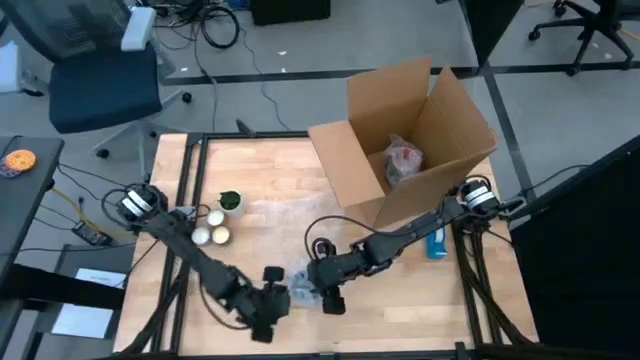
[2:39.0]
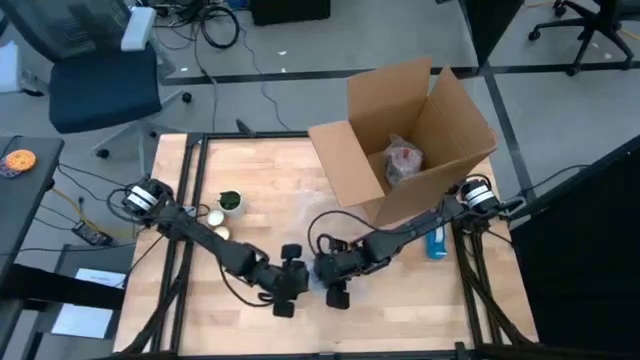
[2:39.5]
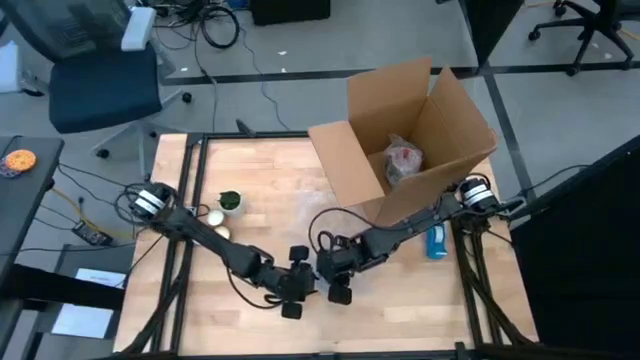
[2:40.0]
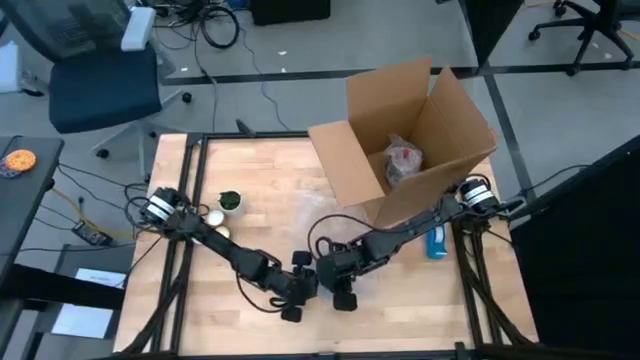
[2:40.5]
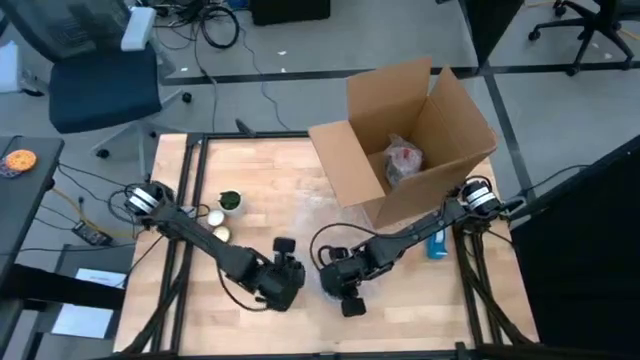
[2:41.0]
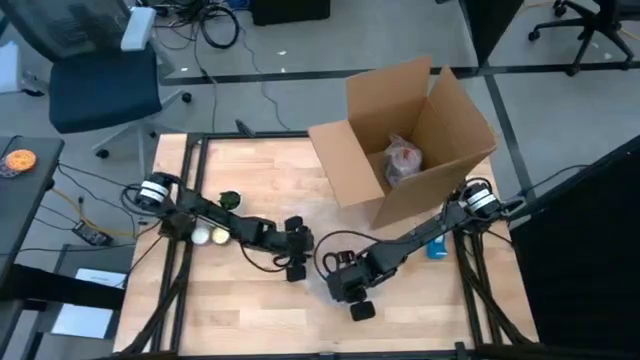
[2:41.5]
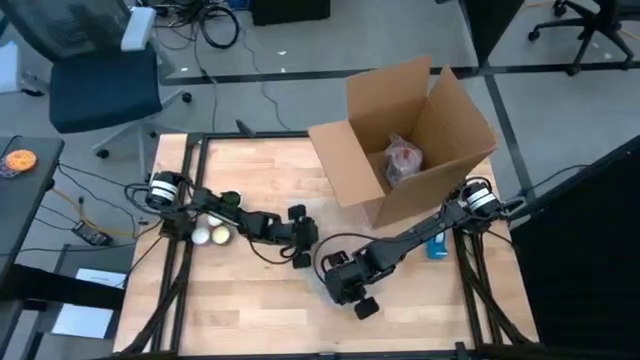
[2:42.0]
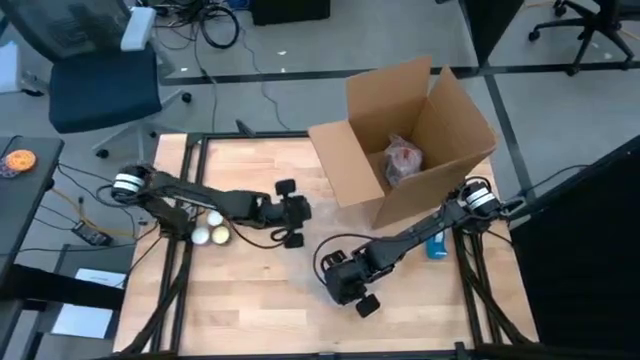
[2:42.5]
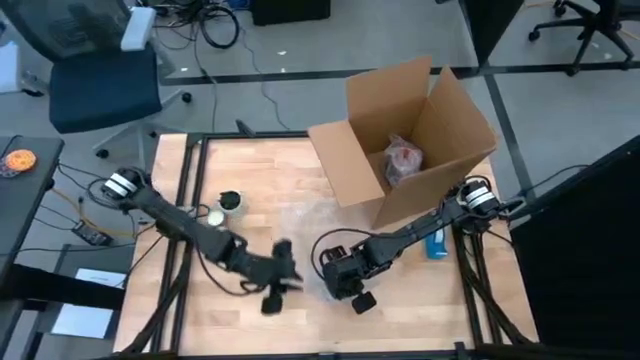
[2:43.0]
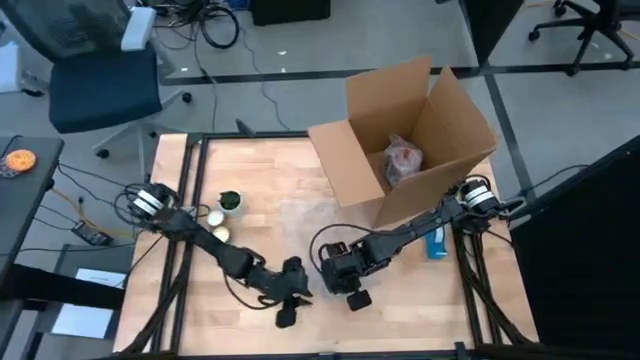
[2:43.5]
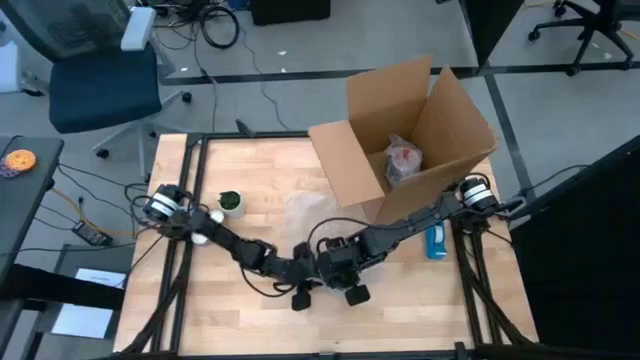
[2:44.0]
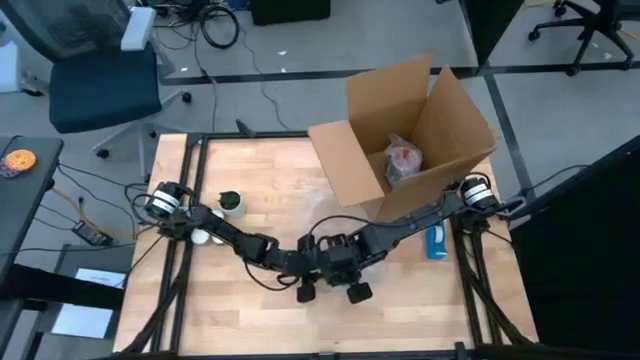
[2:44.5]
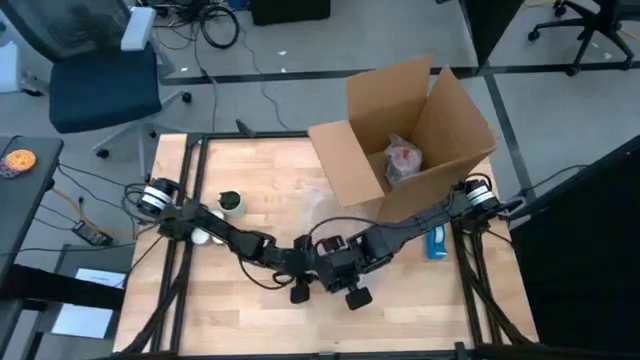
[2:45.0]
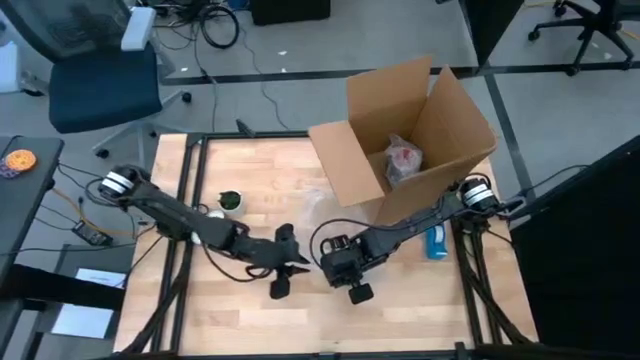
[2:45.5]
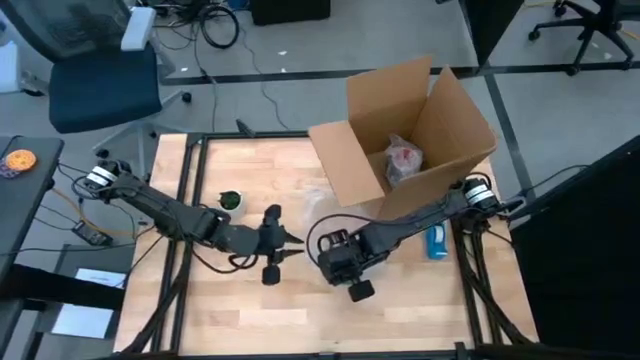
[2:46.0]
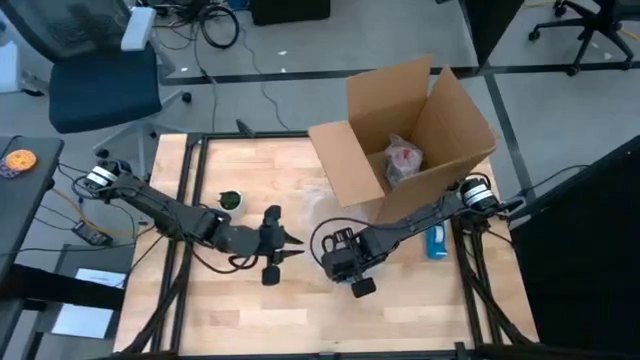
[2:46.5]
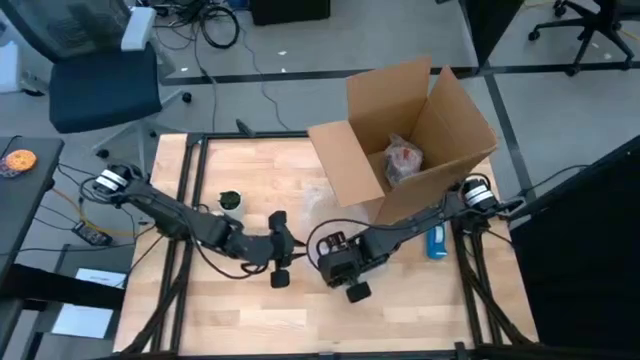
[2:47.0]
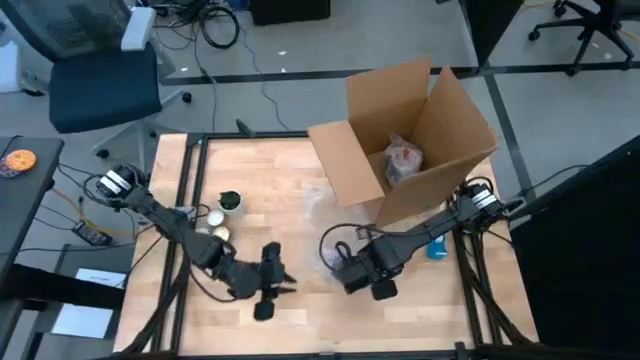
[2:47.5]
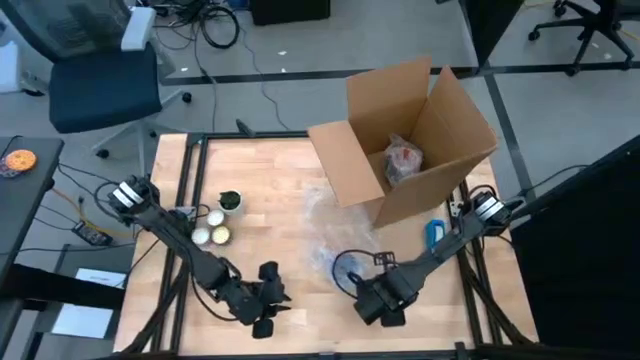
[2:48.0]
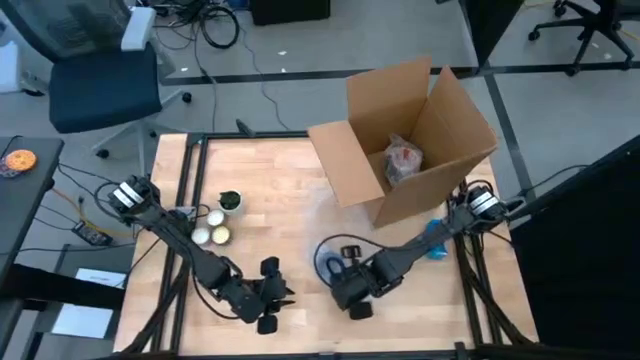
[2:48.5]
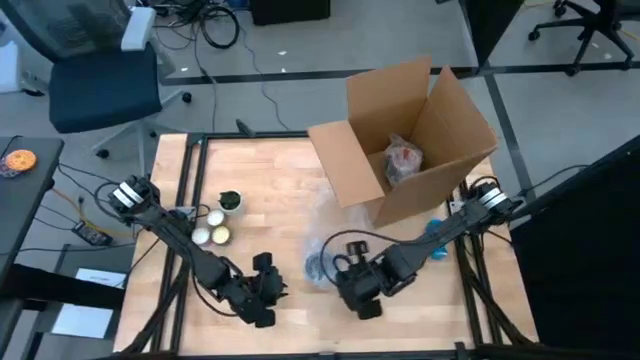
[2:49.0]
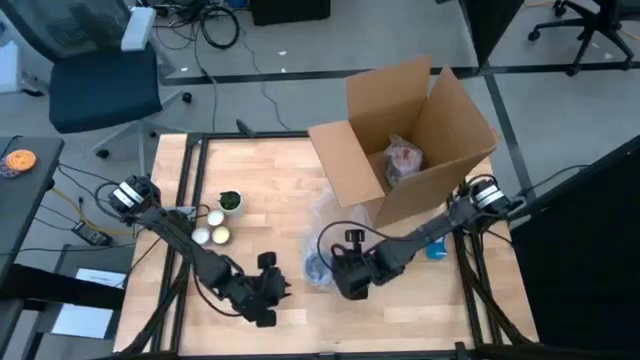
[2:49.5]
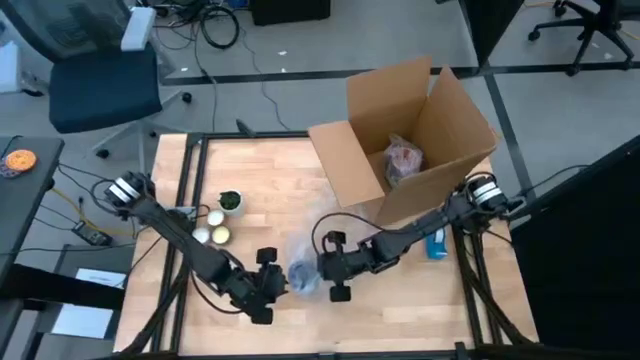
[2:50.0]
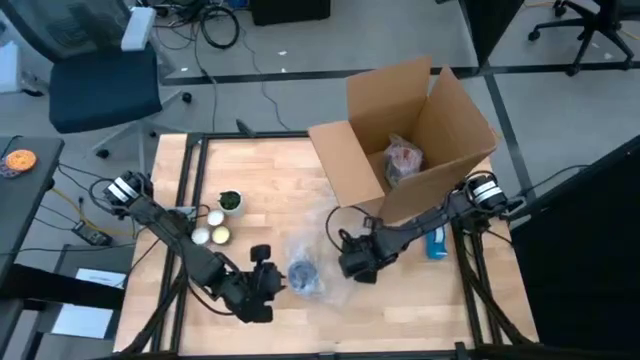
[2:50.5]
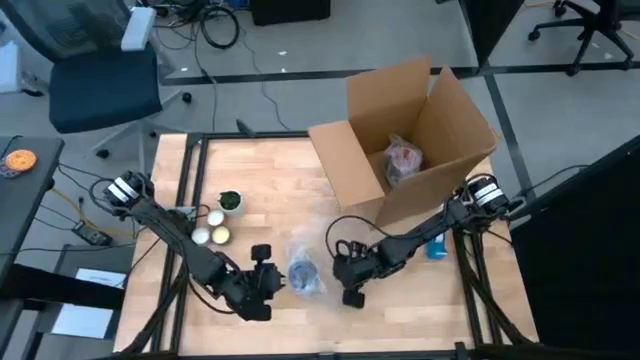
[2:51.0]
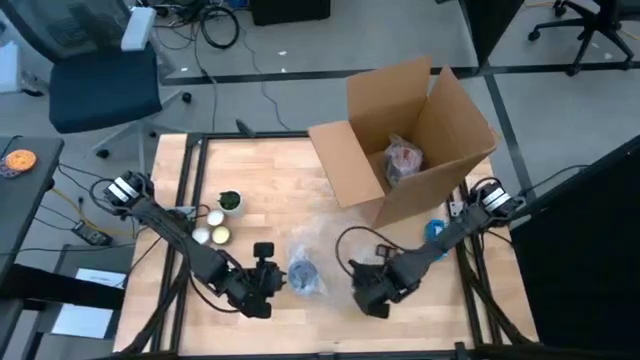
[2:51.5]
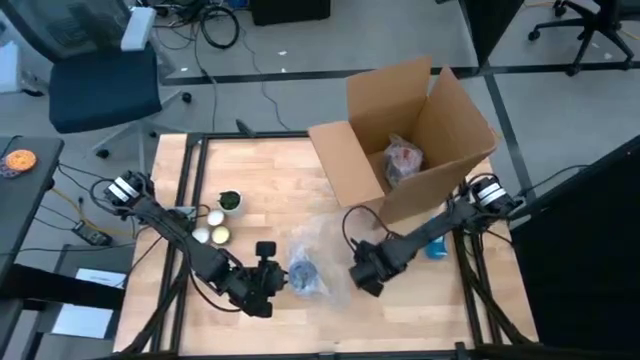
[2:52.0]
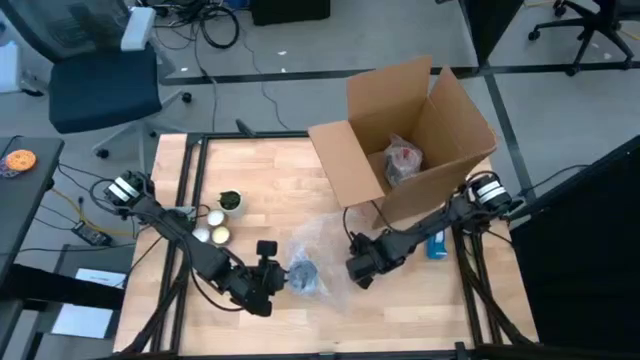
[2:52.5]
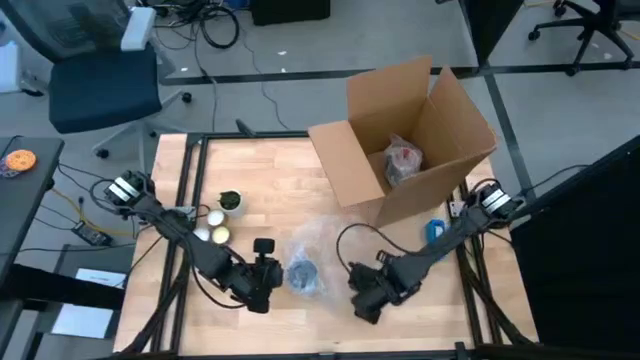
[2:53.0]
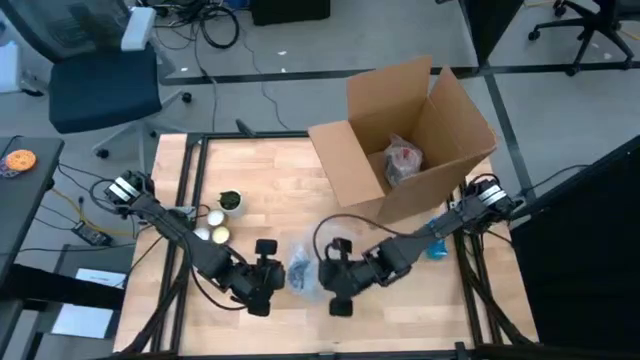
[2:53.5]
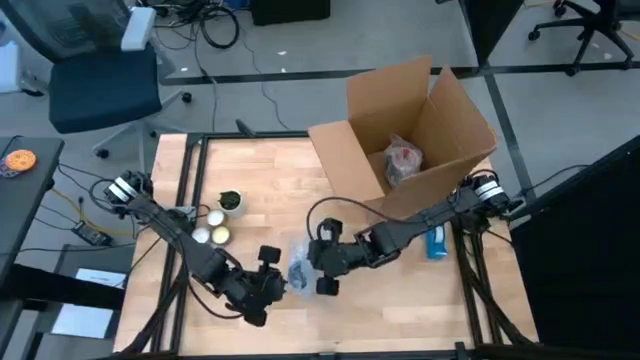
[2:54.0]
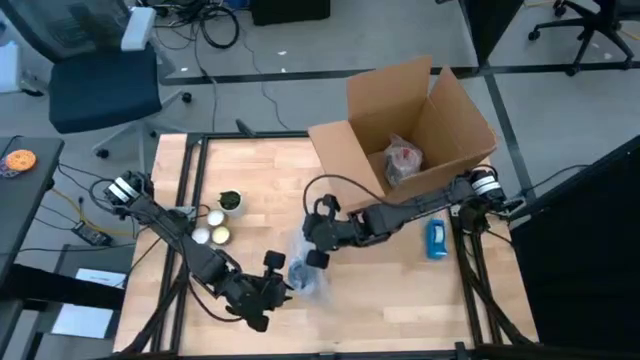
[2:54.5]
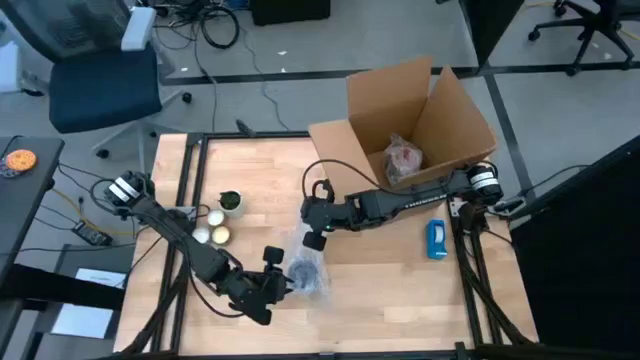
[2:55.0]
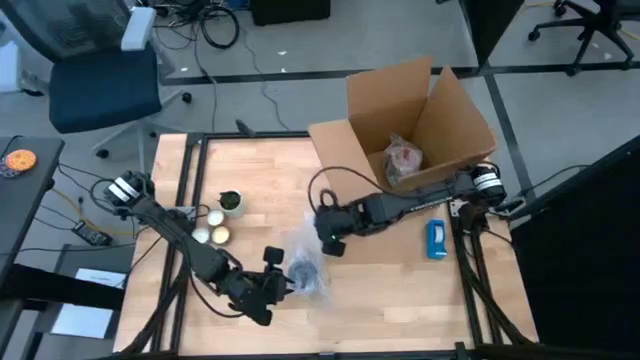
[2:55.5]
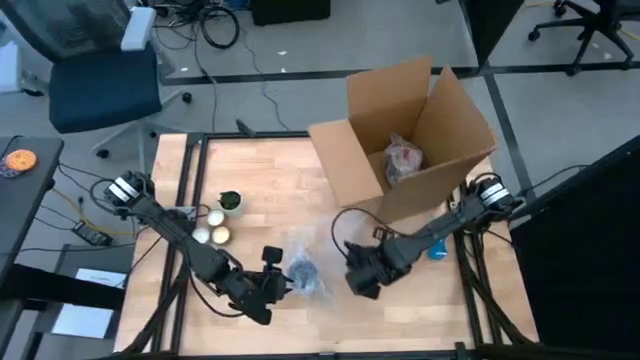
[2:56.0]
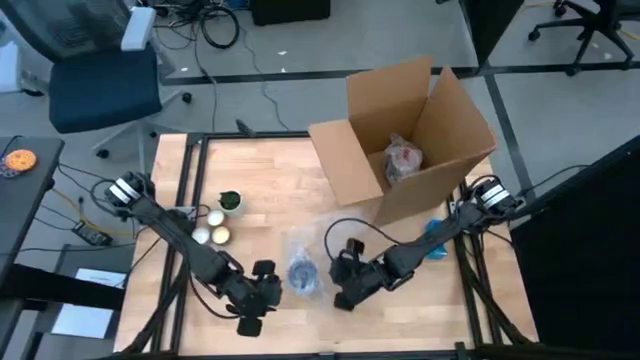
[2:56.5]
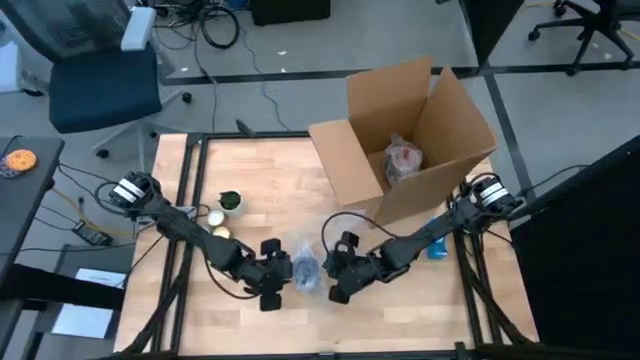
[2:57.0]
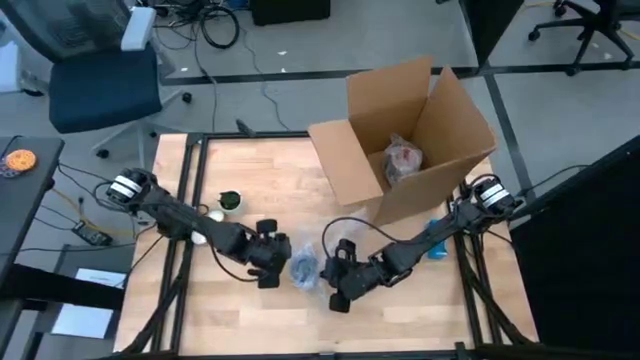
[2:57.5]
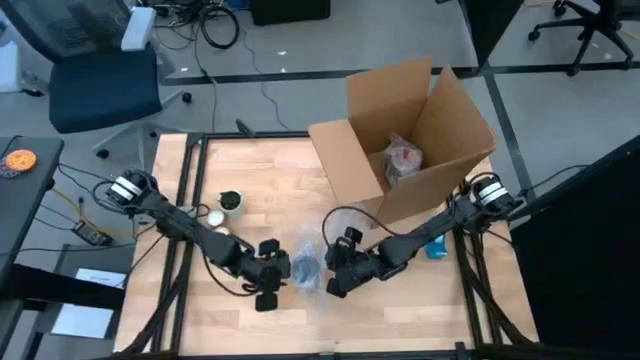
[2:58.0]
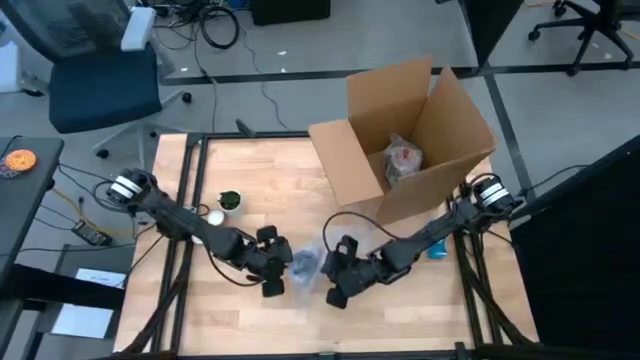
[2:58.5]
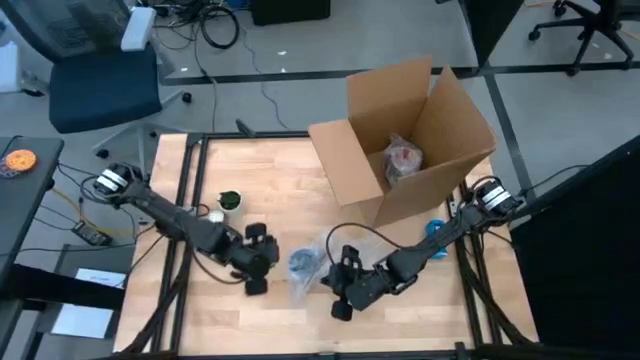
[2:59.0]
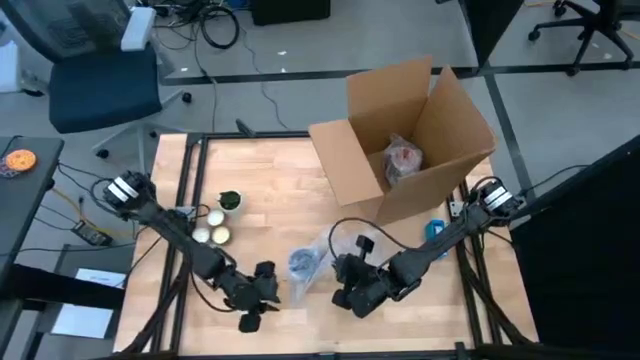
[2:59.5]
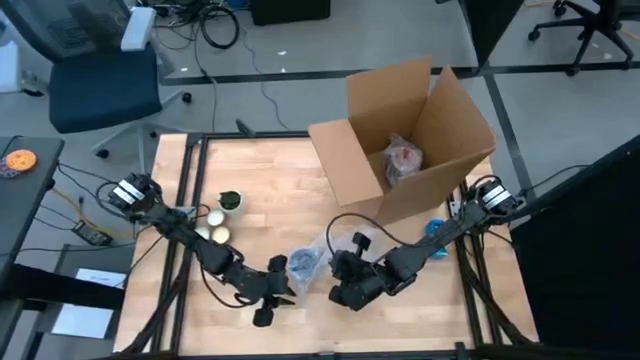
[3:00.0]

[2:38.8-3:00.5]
Task: wrap mug
Wrap the blue mug with bubble wrap

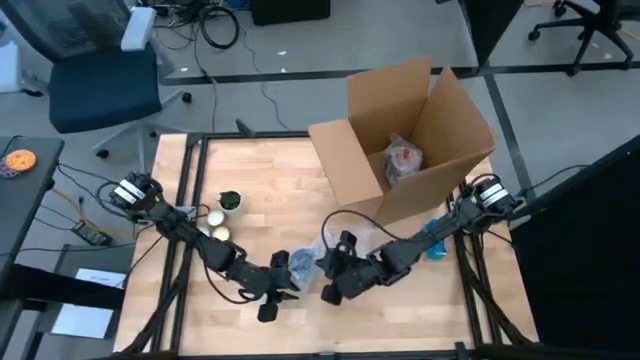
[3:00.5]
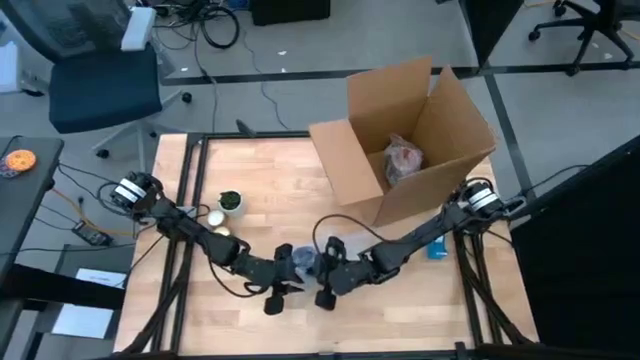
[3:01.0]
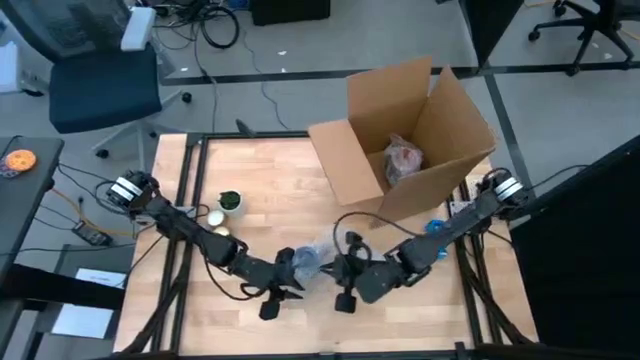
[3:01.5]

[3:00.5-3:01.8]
Wrap the blue mug with bubble wrap
